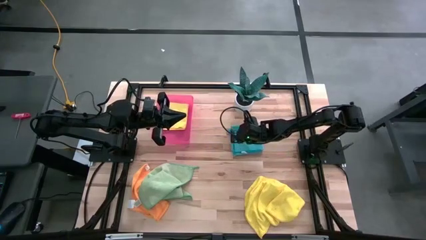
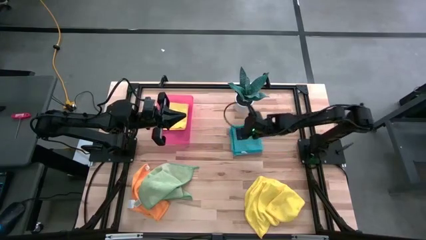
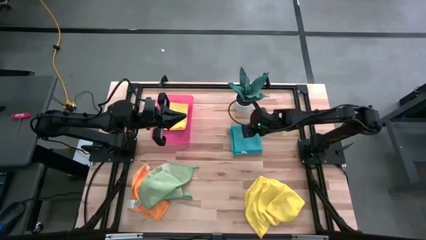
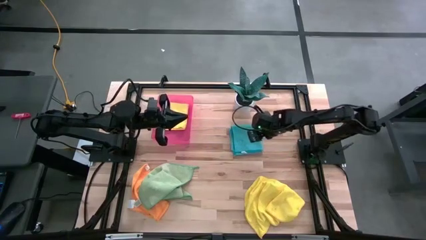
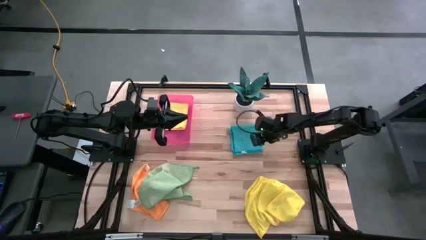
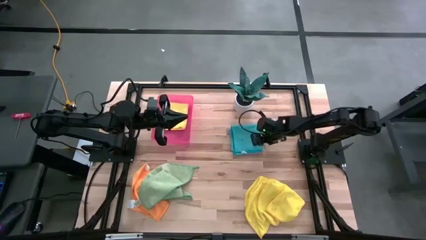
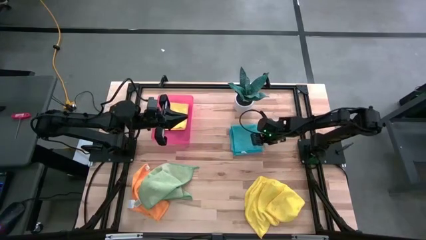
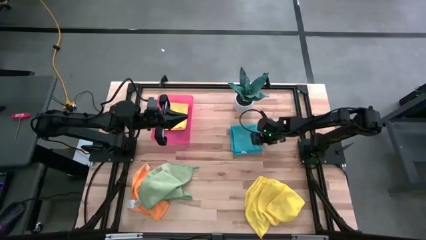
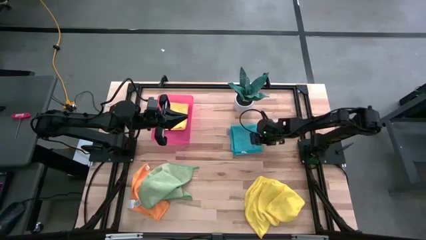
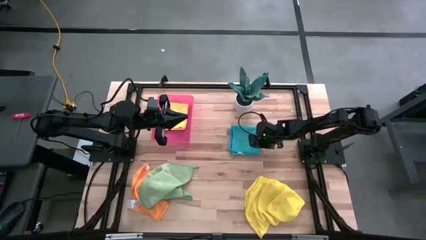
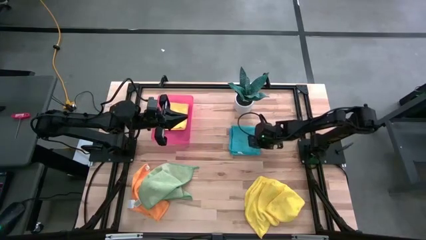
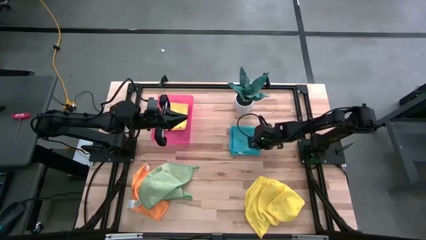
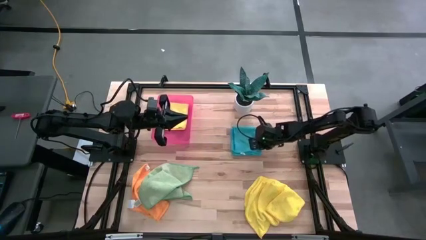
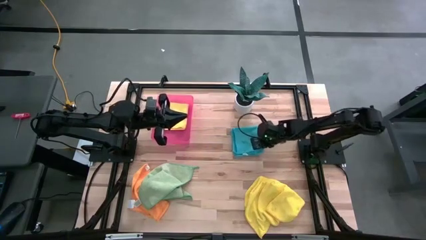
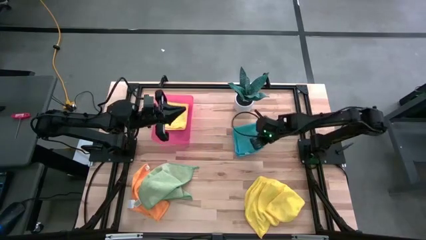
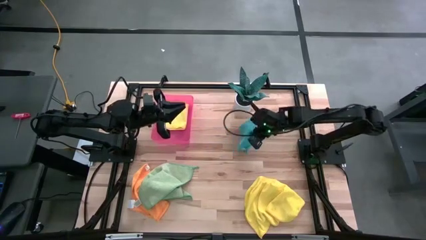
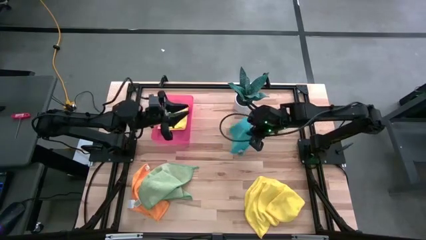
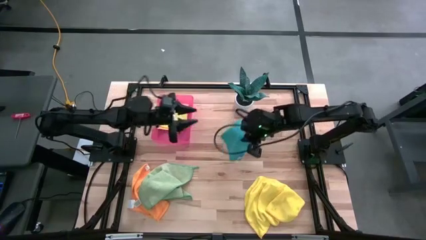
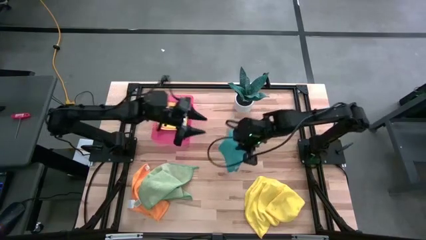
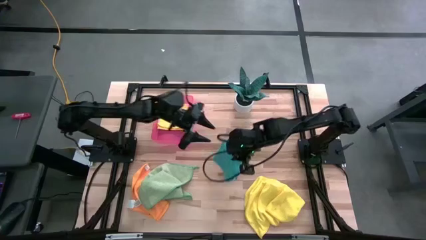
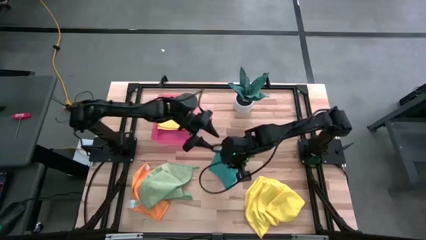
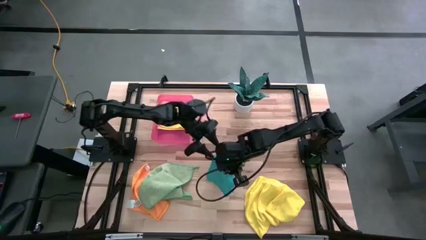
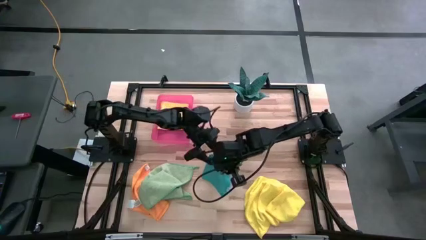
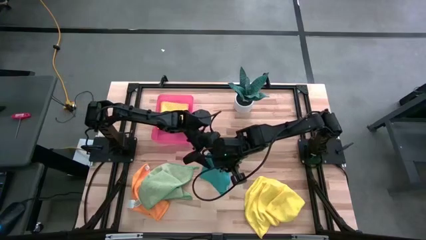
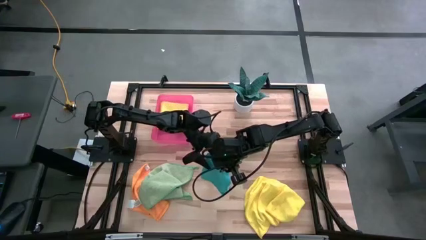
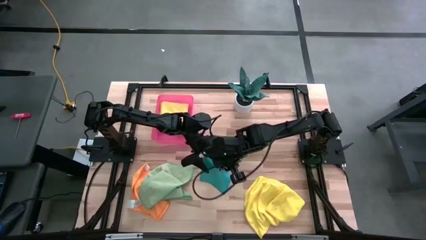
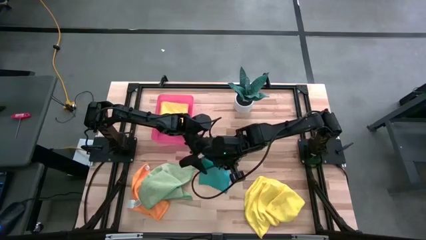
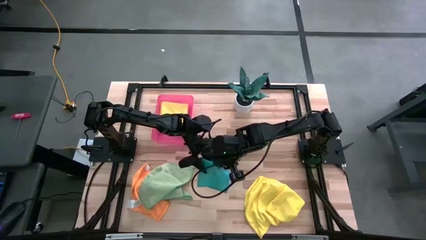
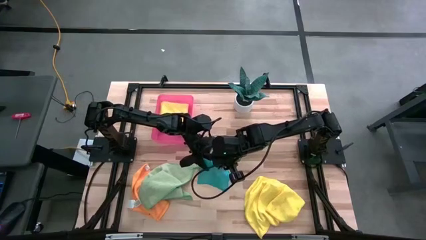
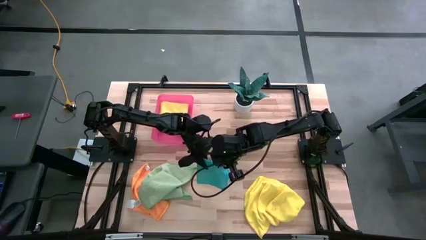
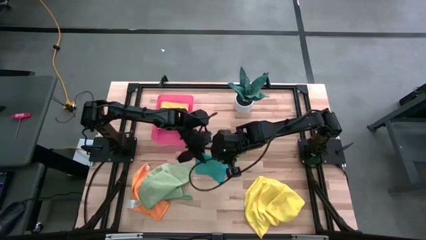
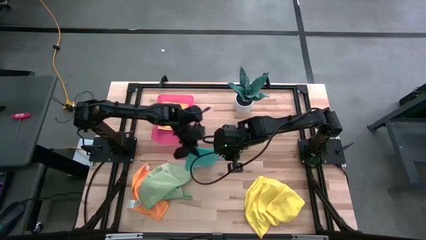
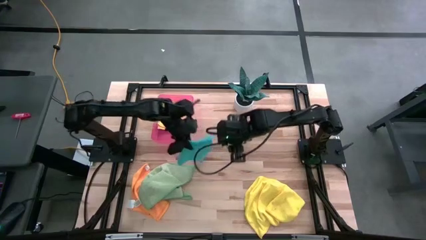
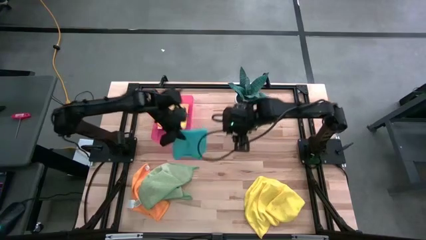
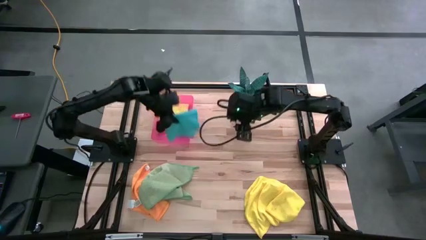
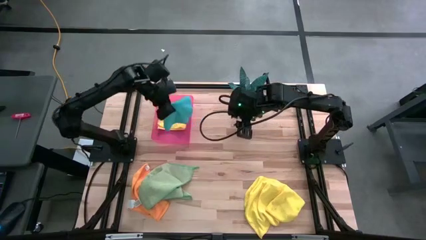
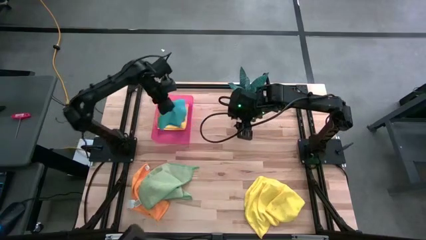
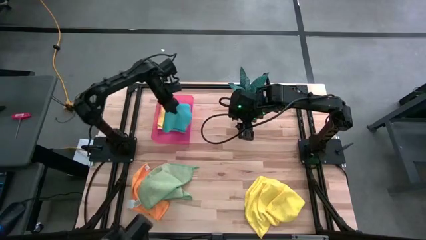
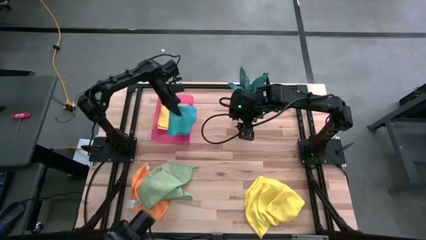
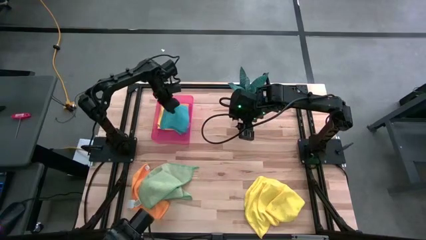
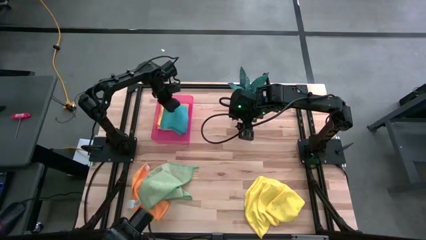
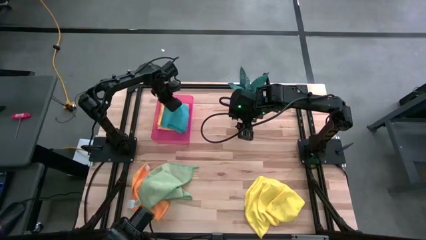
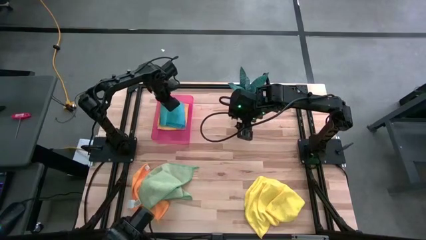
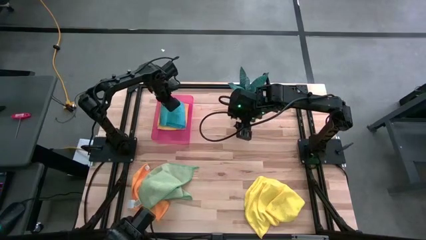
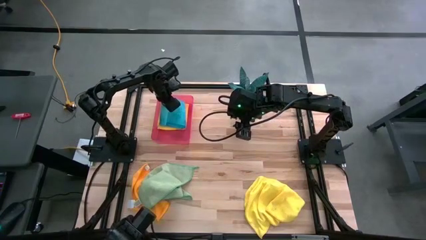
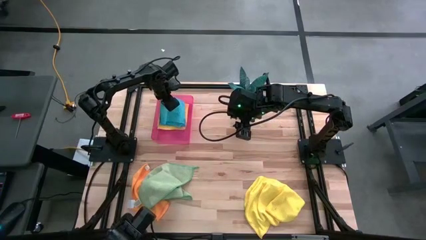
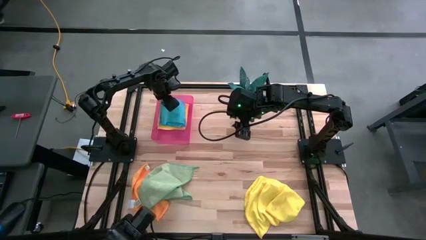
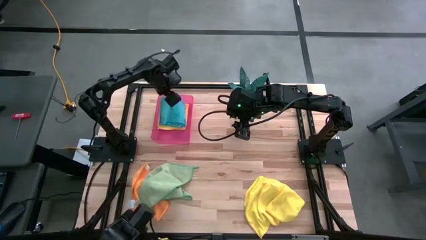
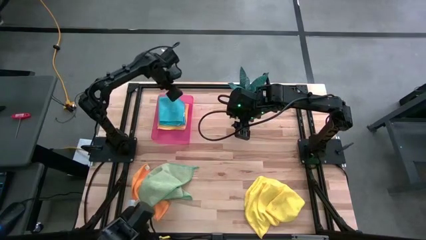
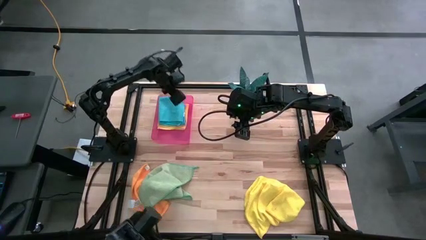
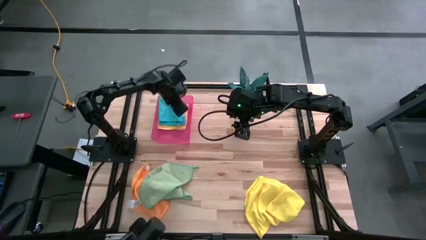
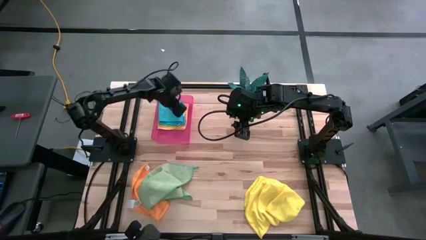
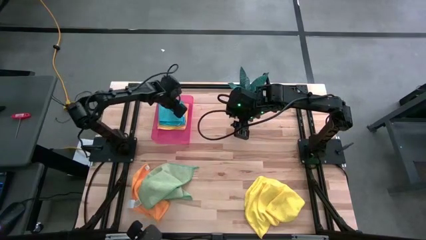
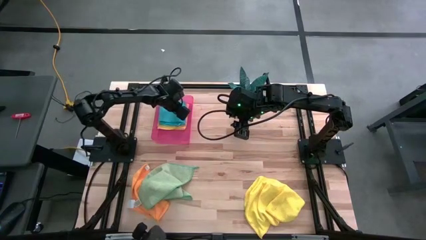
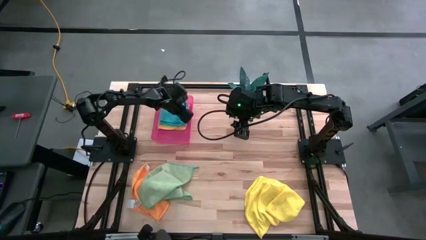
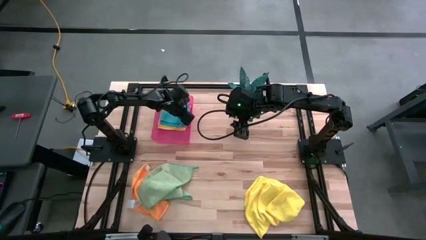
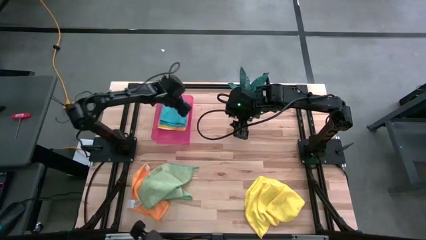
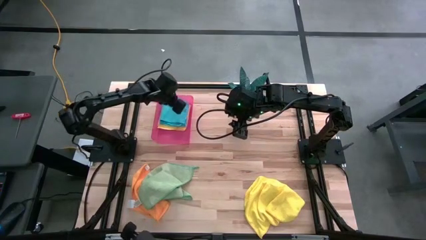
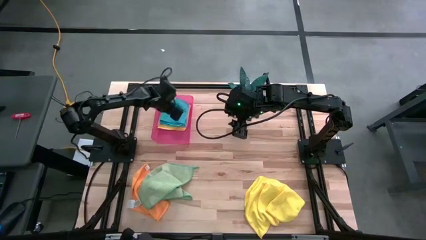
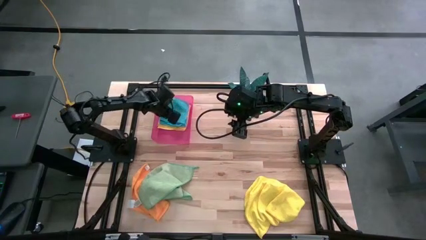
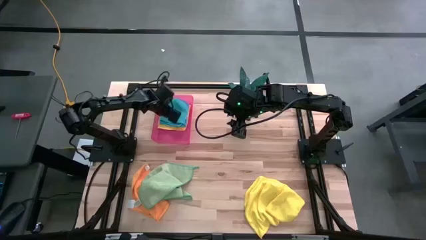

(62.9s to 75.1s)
Task: Fold microfiber towels
Put the folded blue microfiber towel into the pink bin

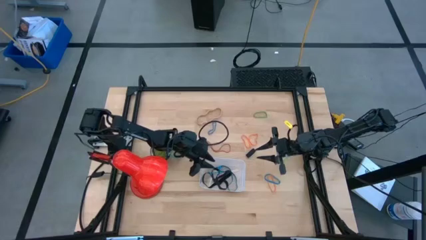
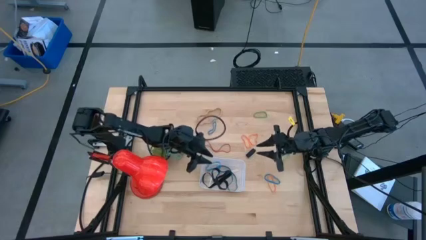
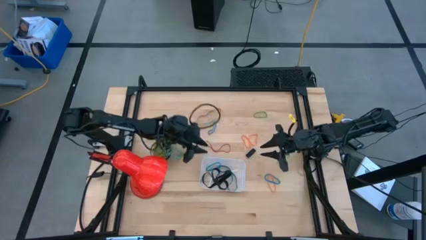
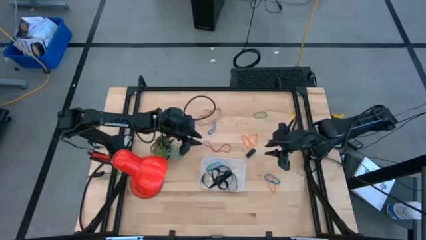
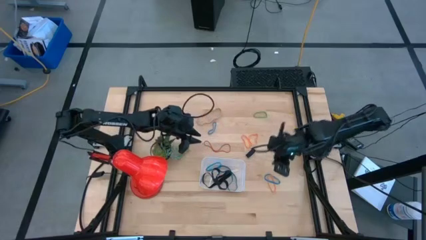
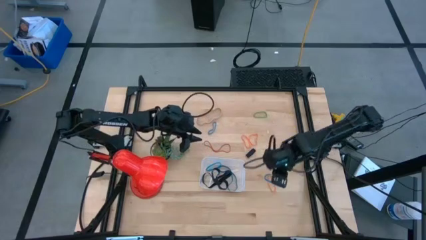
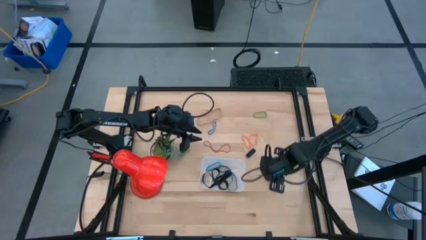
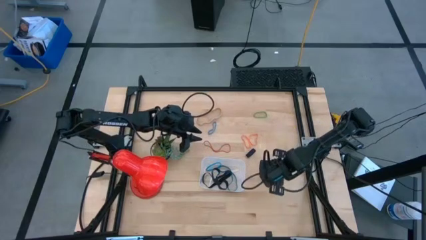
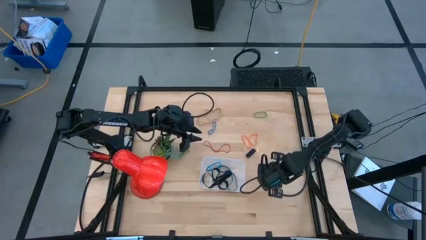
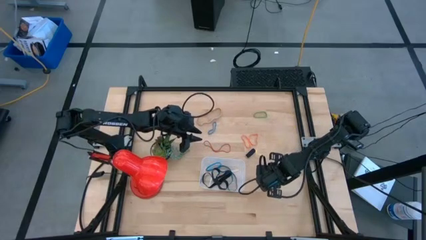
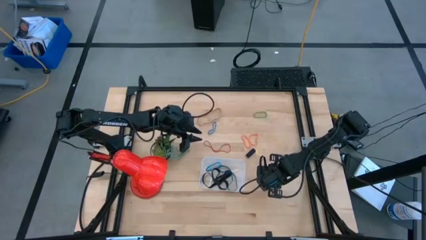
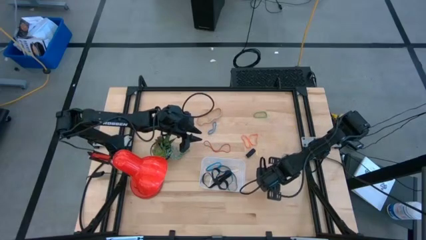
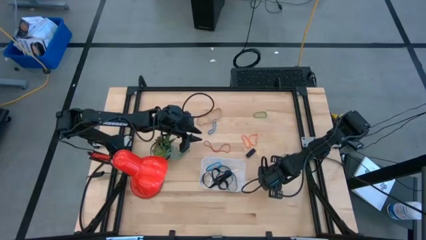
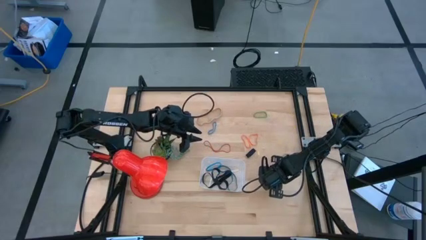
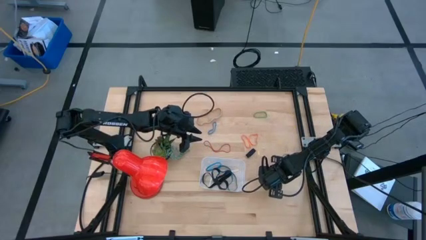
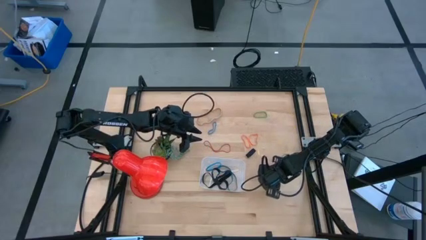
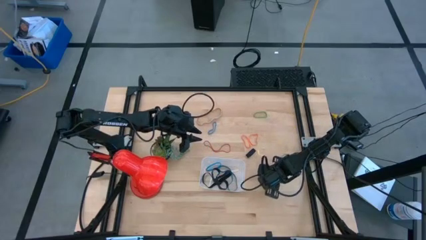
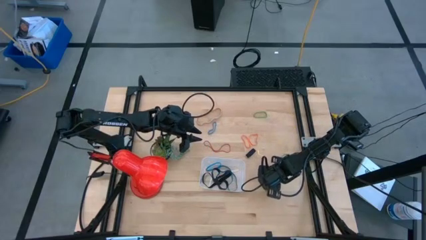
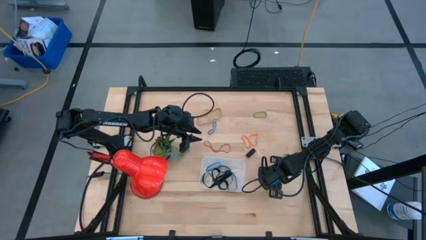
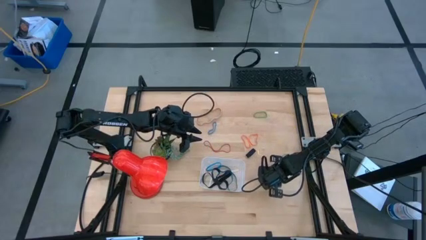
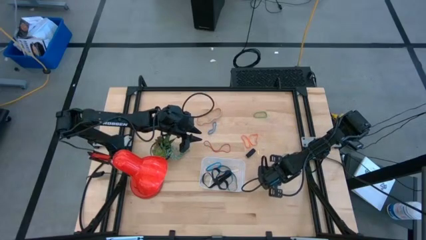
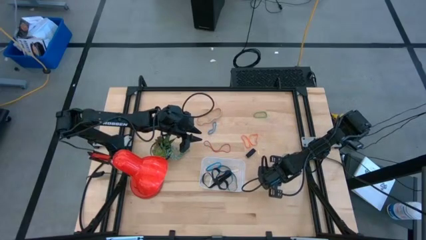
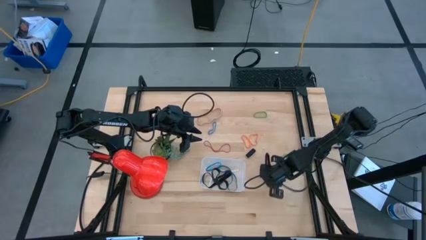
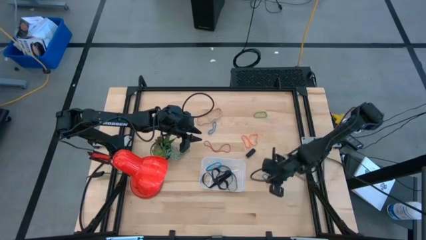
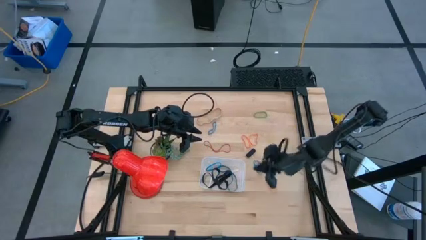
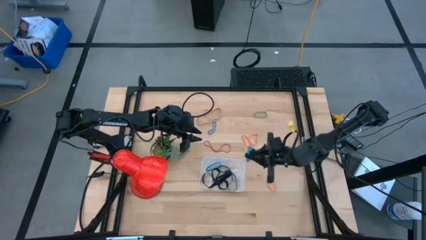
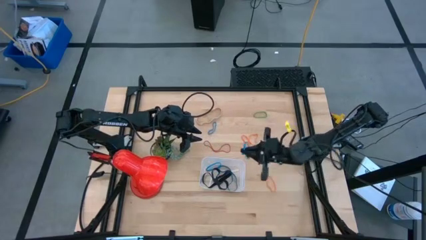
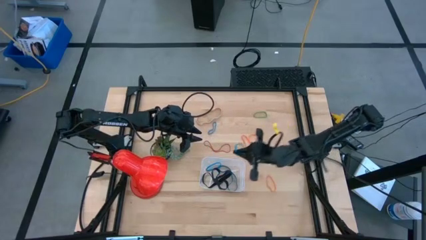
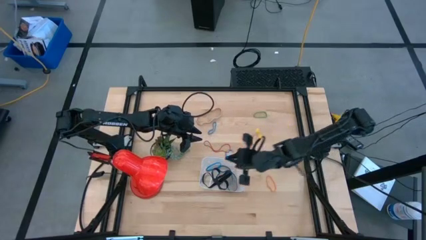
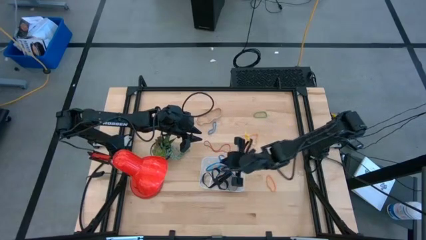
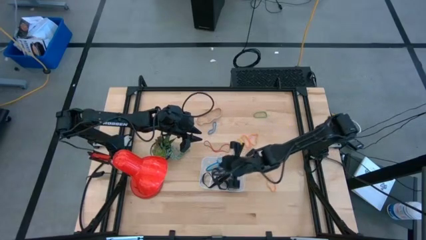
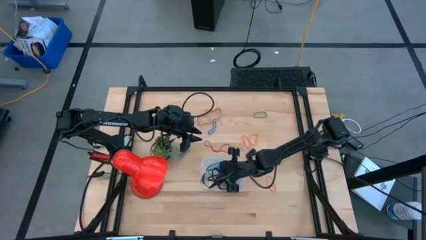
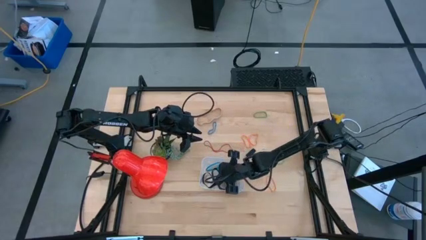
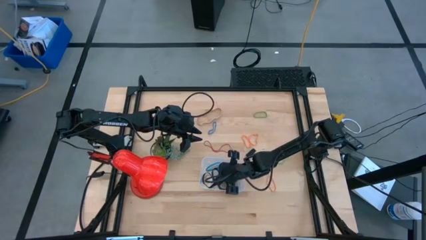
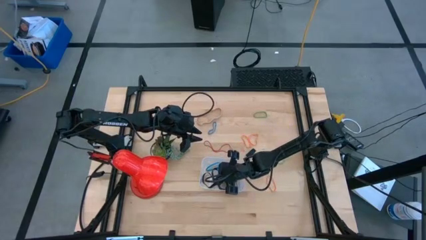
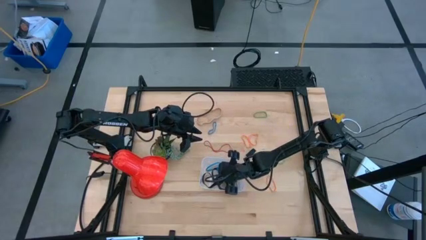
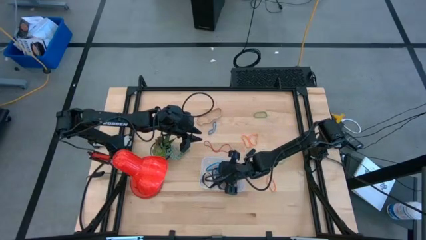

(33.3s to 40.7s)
Task: Pick and place rubber bands into bin
Put the bottom blue rubber band into the bin
